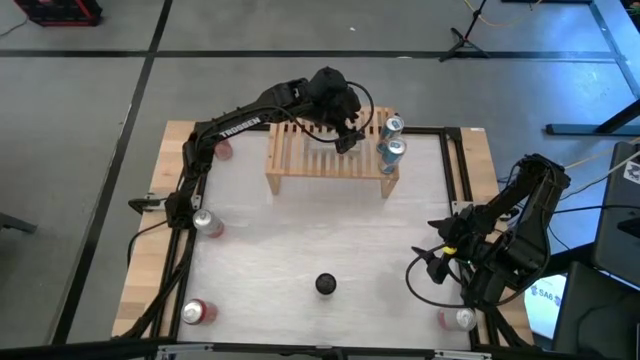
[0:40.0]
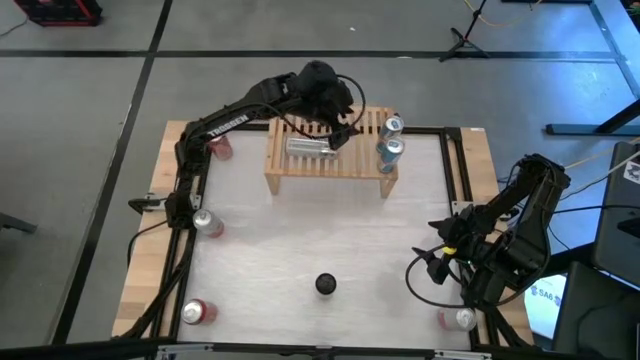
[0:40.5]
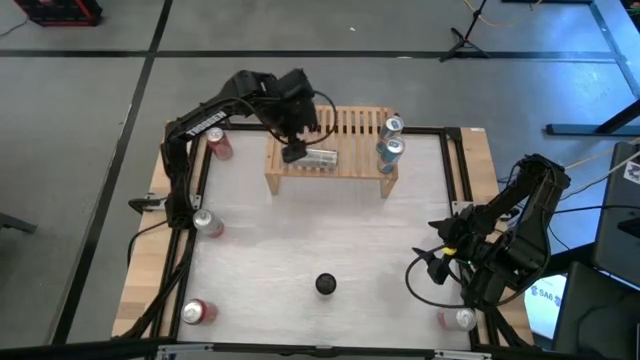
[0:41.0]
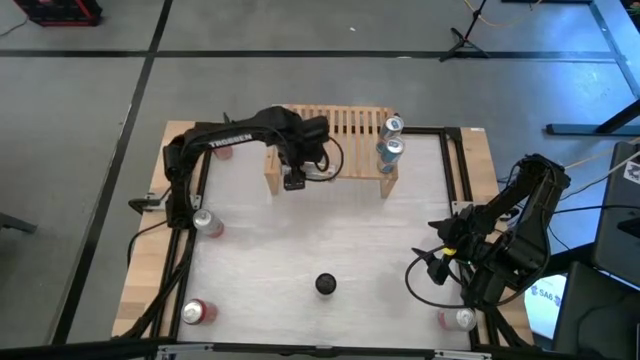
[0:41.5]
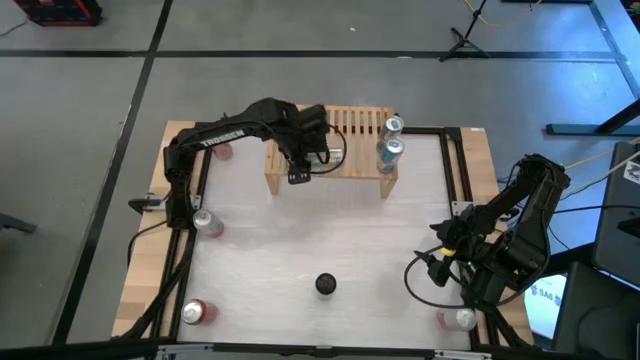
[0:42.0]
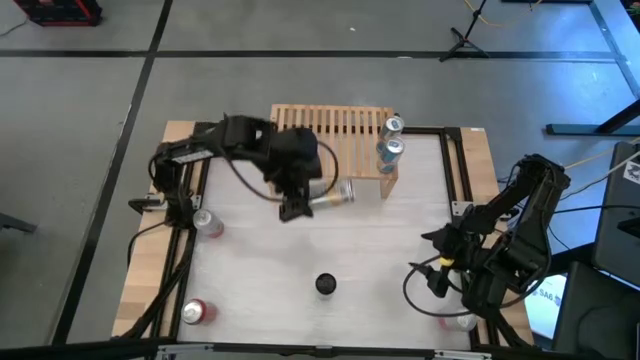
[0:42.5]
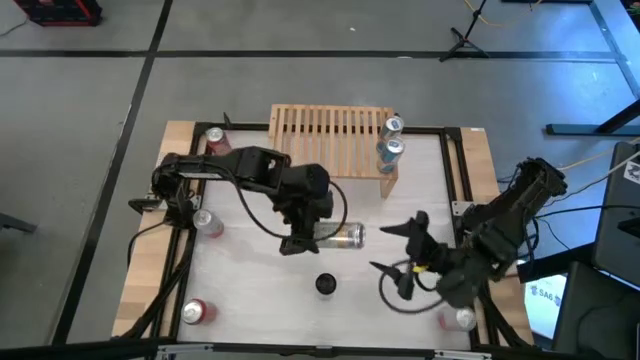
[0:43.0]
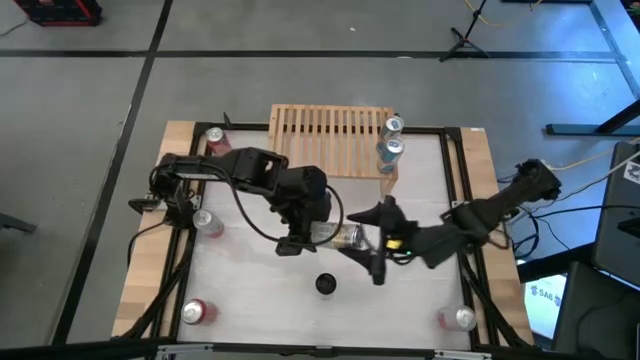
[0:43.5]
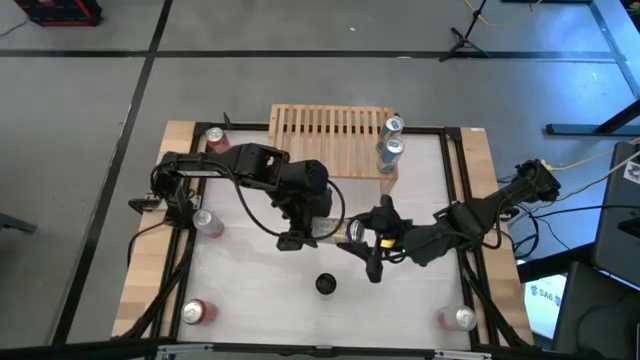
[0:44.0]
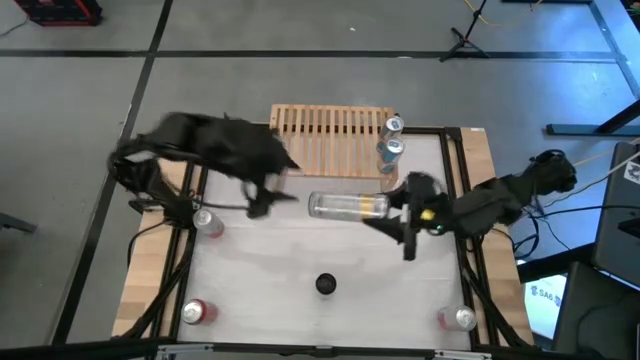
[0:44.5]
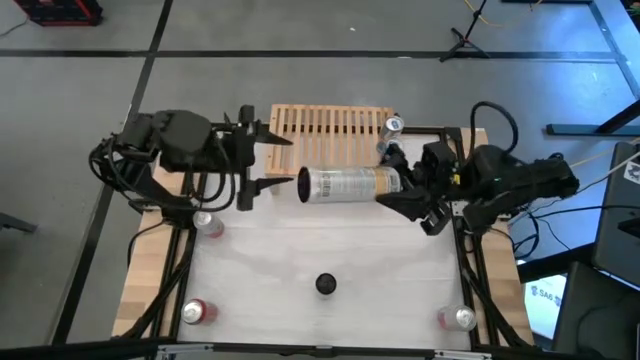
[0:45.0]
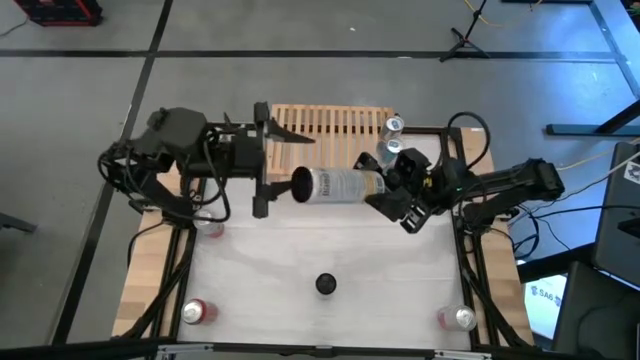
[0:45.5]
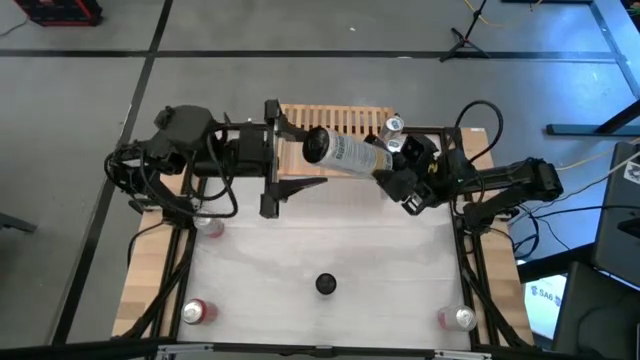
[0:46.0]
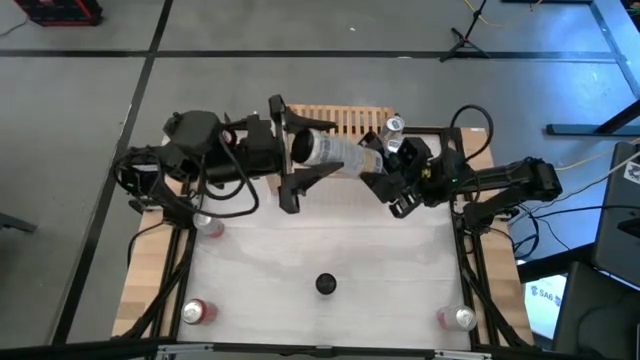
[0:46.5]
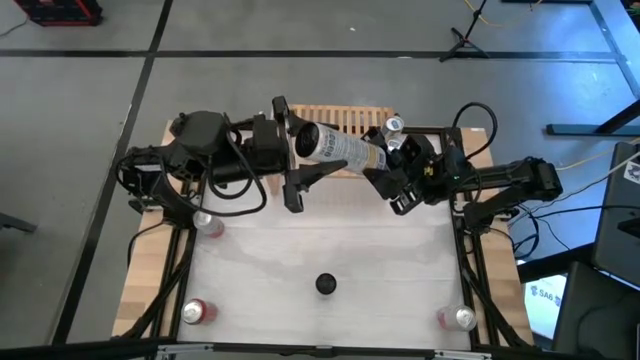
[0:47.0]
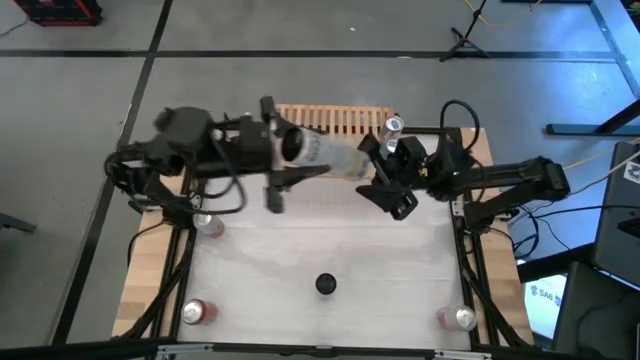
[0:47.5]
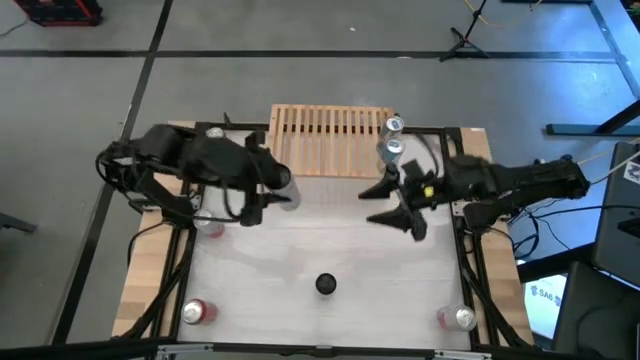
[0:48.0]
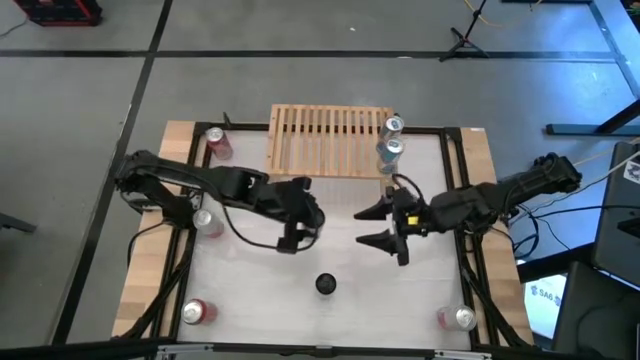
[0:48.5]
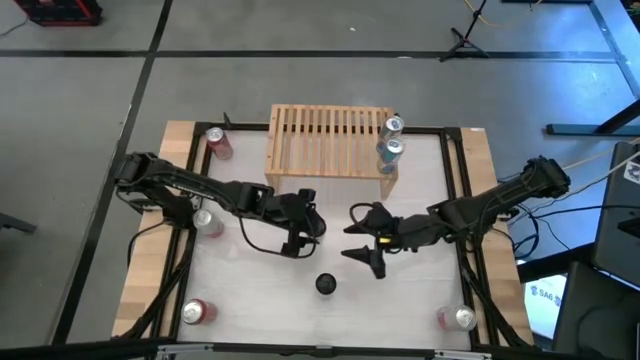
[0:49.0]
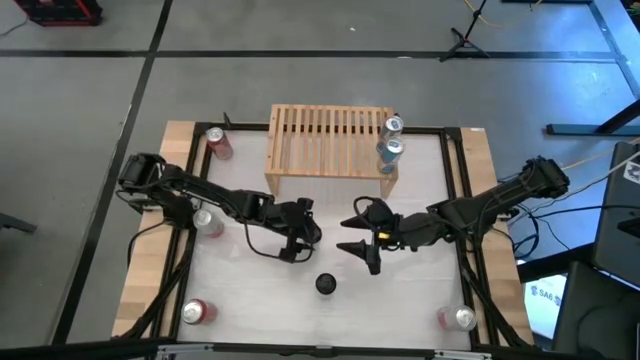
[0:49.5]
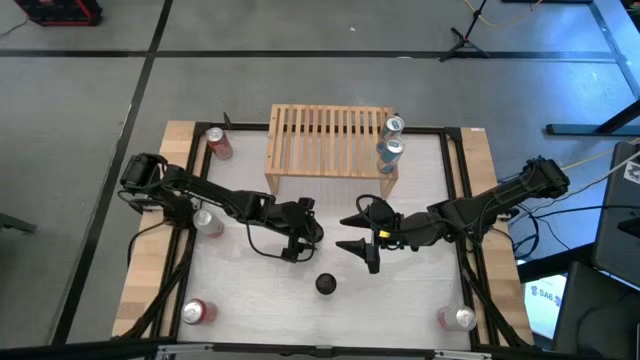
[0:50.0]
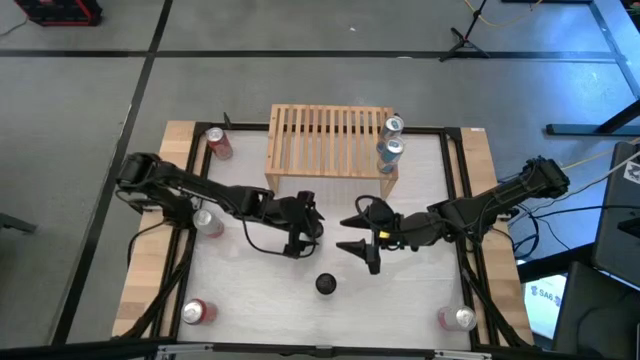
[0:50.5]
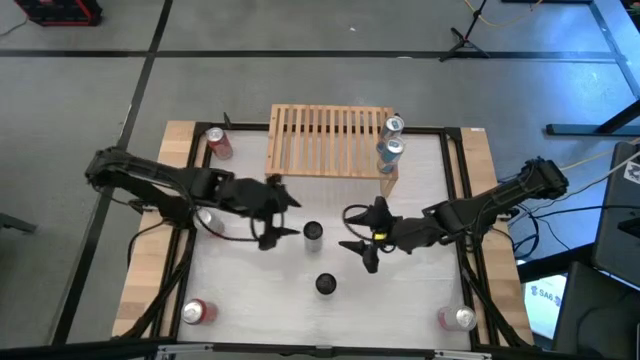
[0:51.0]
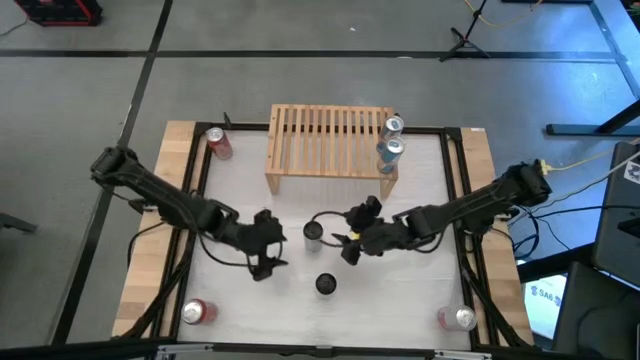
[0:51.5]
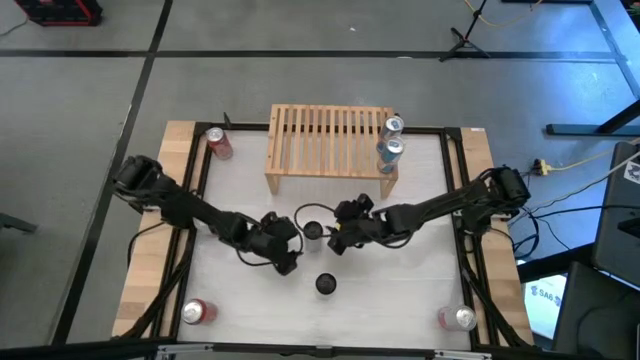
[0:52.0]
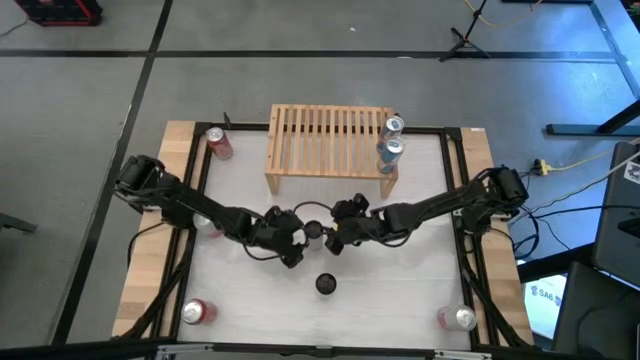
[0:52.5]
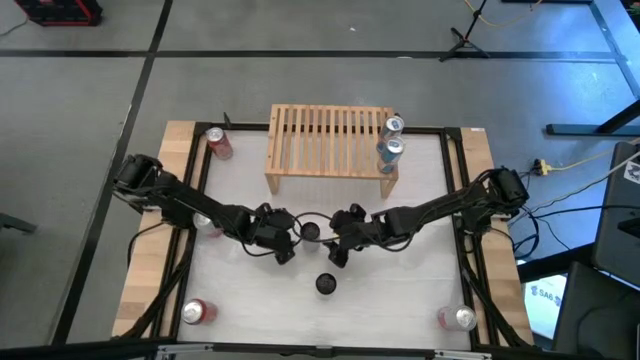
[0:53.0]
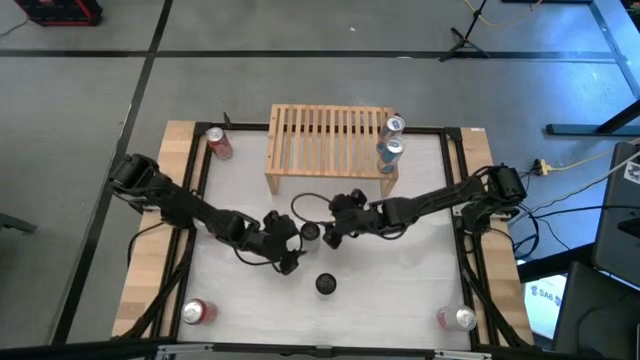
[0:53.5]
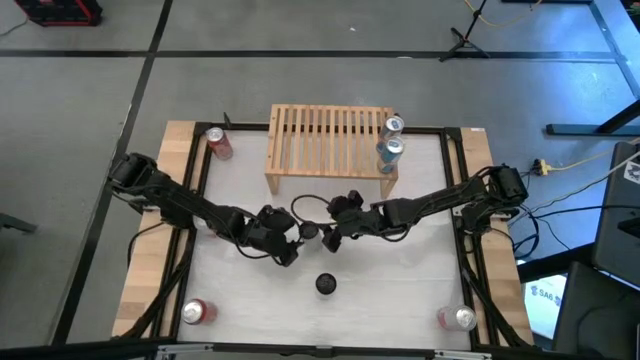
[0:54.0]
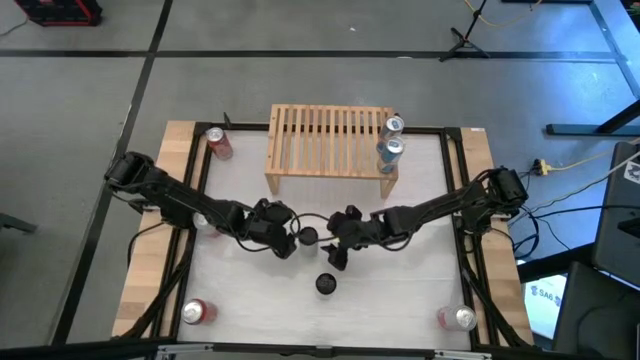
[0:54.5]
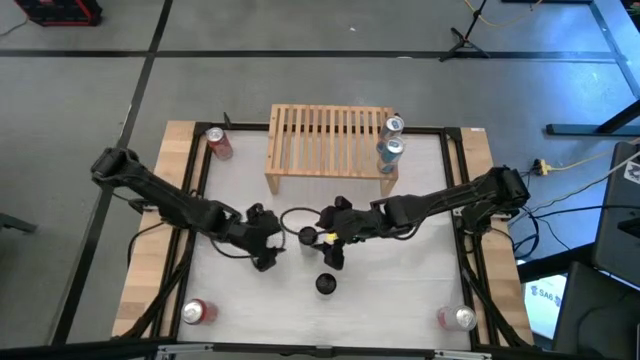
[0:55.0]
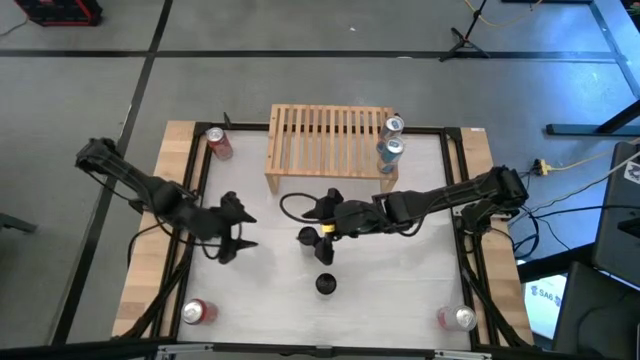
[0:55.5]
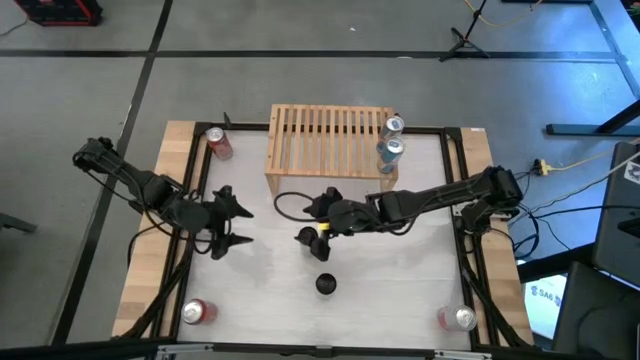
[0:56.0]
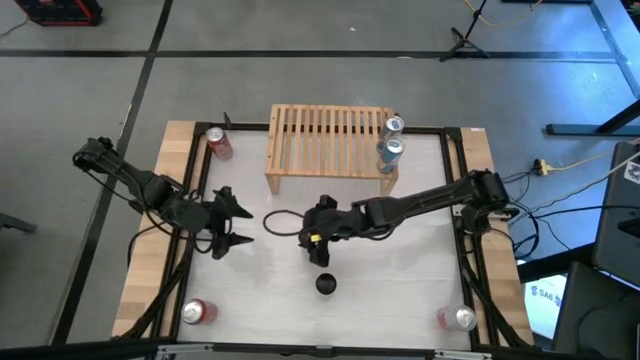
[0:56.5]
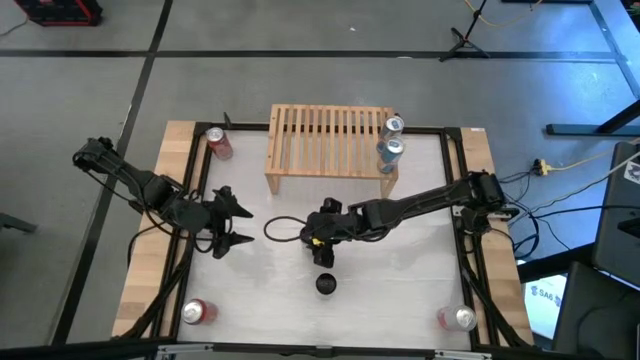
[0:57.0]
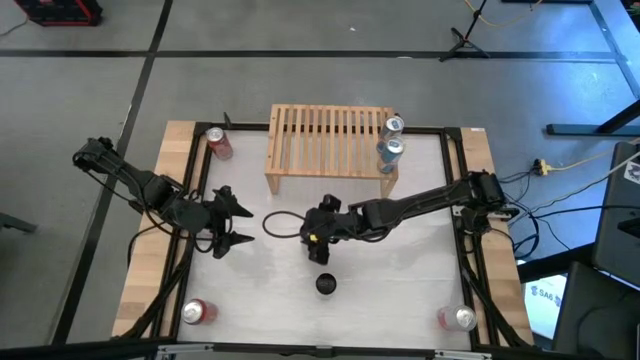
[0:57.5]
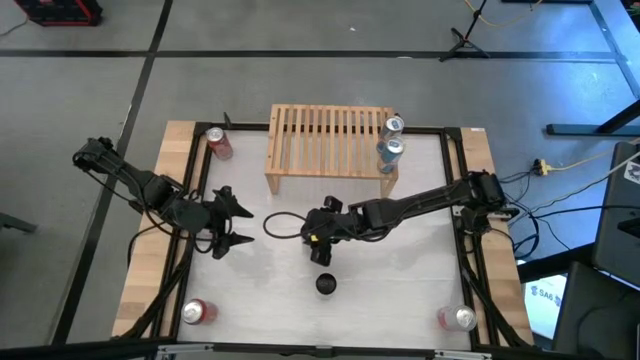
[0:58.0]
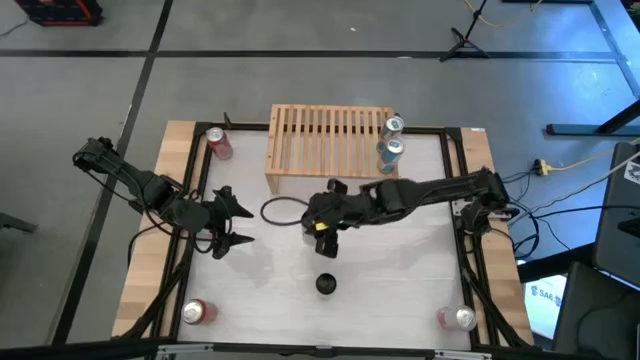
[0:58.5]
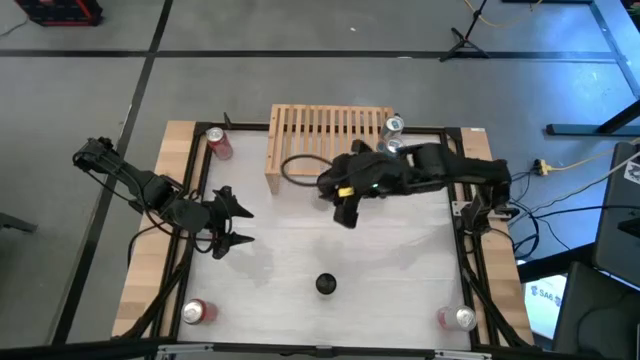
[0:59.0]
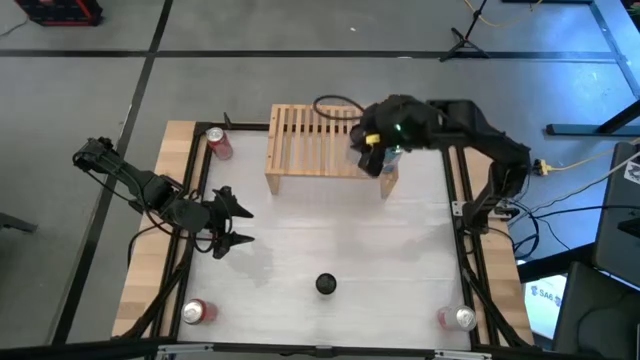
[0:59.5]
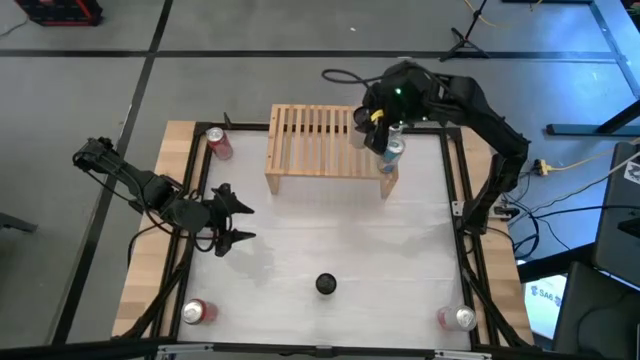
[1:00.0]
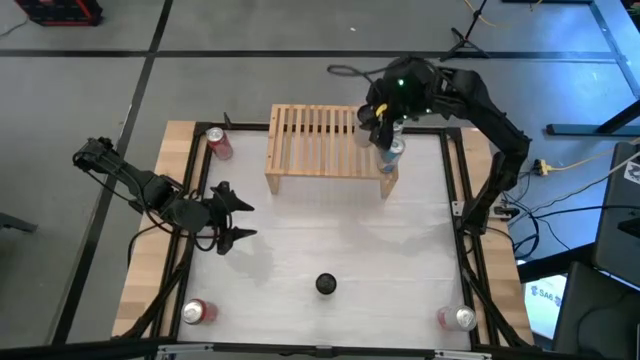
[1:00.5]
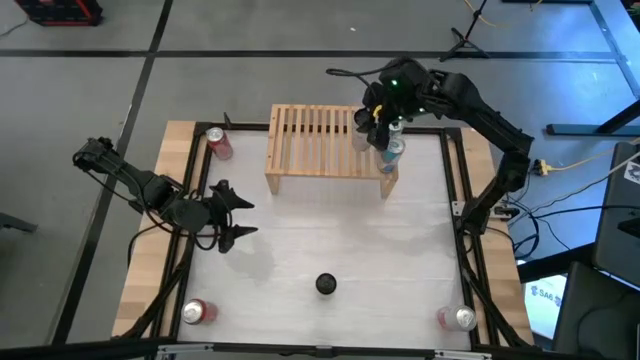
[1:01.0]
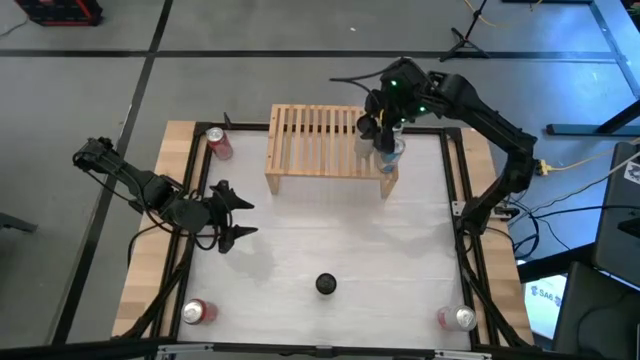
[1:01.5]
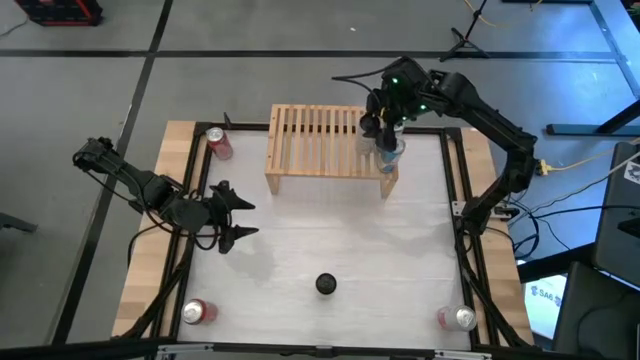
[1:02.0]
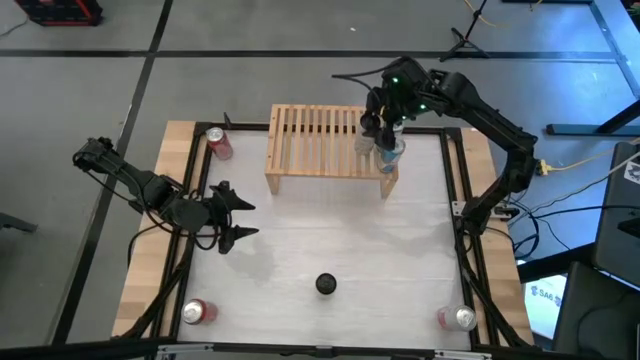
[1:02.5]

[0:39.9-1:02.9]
Task: Place canned beverage on shelf
Put the top white and yellow soda can on the shelf
